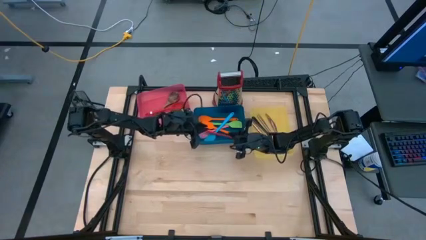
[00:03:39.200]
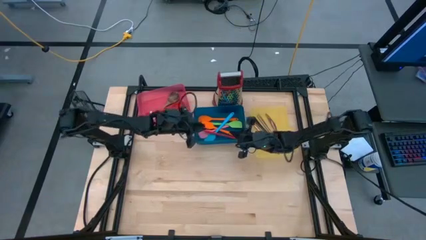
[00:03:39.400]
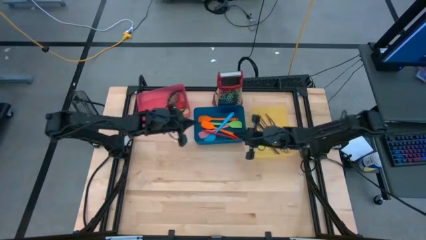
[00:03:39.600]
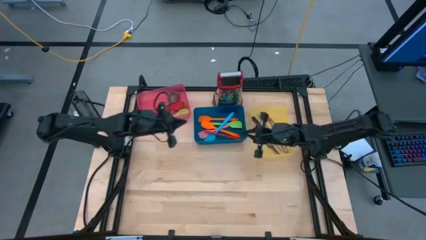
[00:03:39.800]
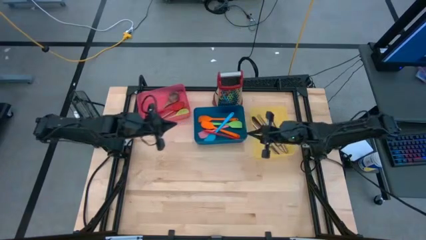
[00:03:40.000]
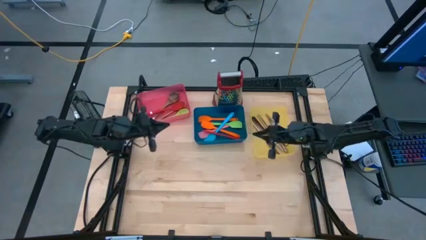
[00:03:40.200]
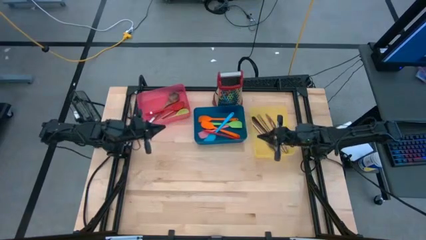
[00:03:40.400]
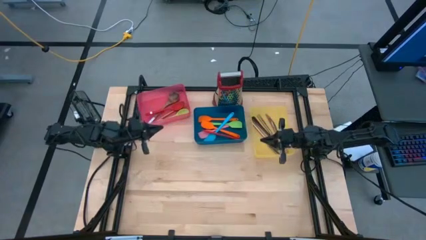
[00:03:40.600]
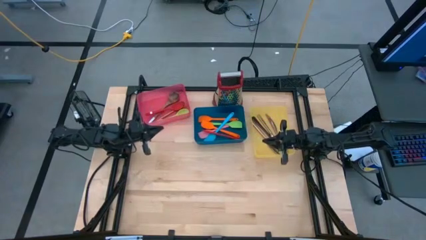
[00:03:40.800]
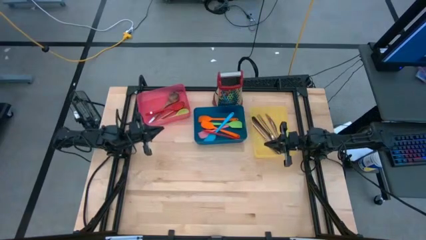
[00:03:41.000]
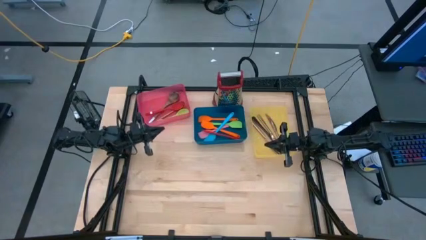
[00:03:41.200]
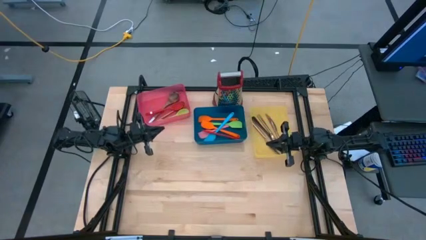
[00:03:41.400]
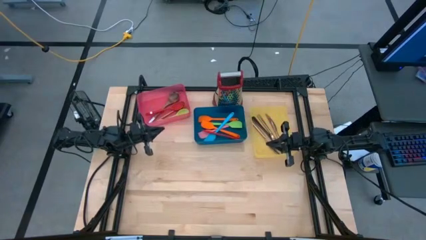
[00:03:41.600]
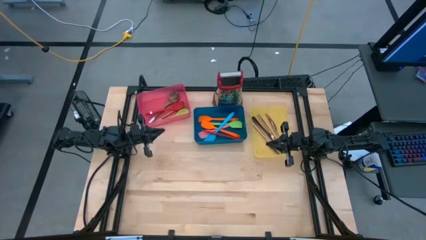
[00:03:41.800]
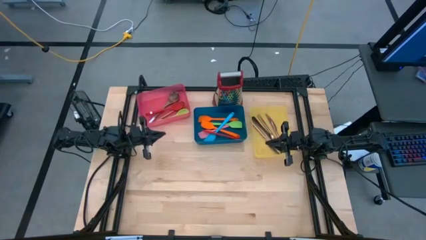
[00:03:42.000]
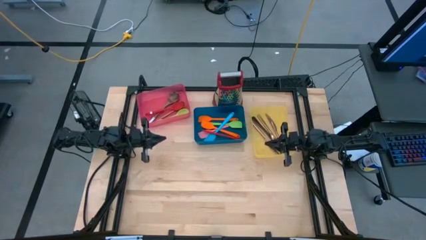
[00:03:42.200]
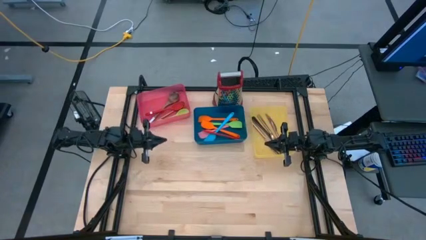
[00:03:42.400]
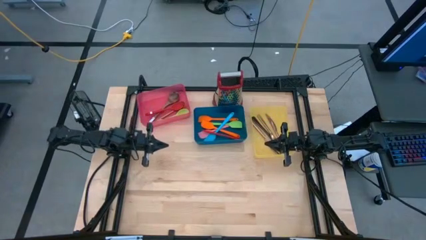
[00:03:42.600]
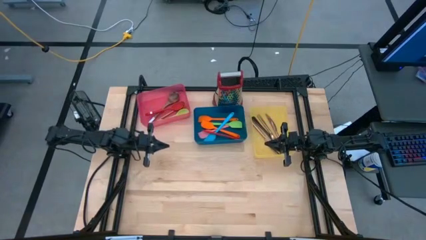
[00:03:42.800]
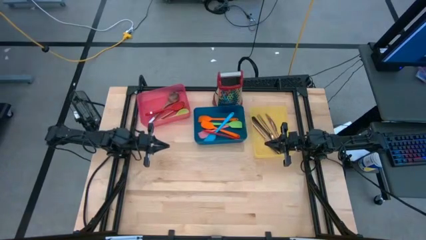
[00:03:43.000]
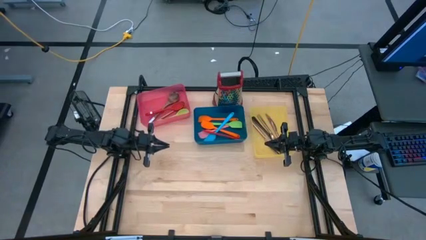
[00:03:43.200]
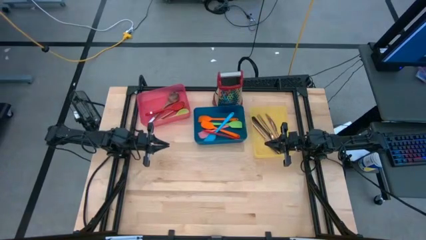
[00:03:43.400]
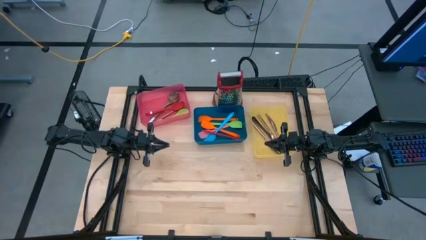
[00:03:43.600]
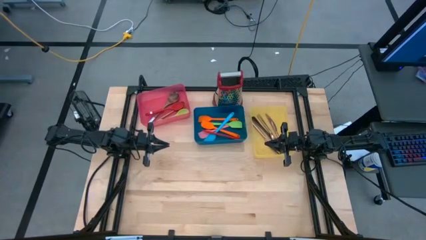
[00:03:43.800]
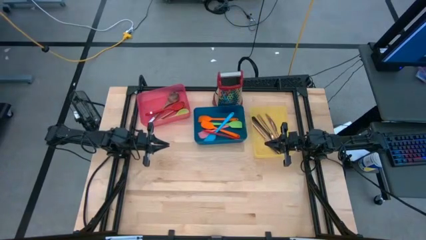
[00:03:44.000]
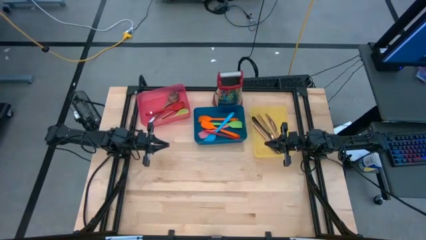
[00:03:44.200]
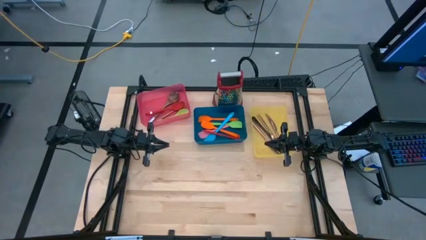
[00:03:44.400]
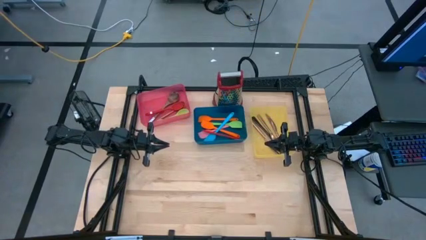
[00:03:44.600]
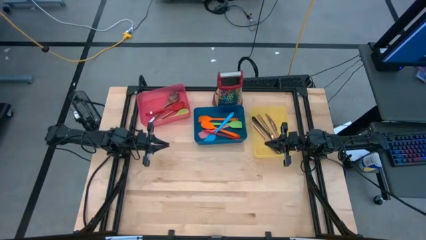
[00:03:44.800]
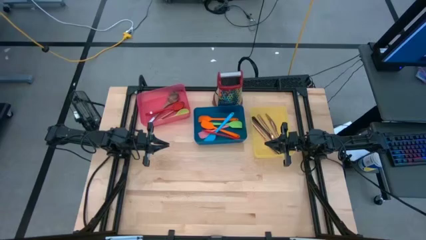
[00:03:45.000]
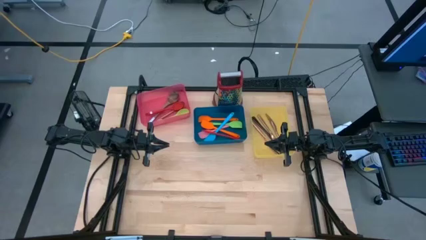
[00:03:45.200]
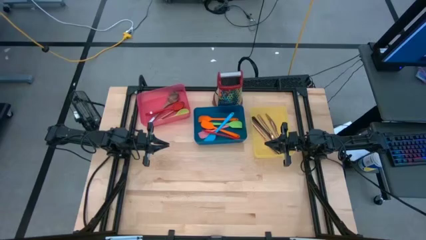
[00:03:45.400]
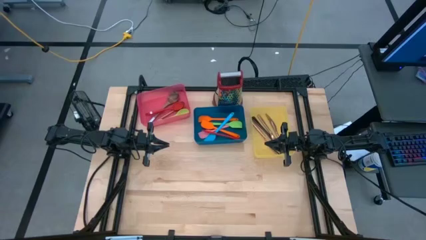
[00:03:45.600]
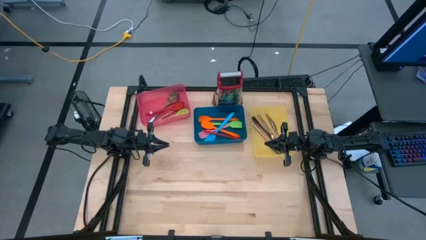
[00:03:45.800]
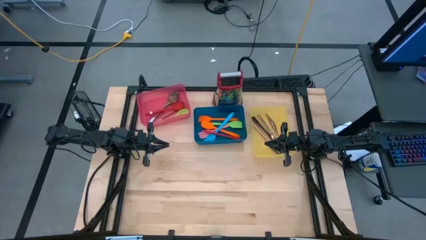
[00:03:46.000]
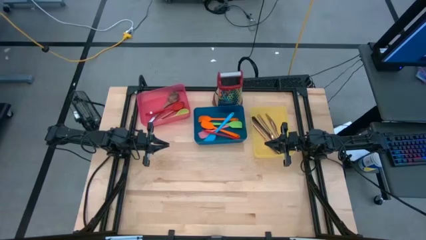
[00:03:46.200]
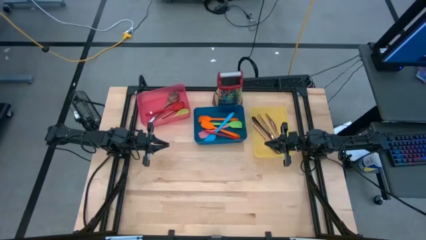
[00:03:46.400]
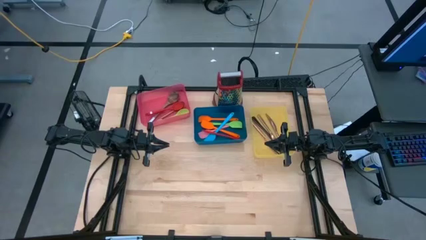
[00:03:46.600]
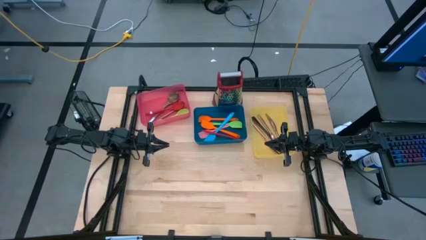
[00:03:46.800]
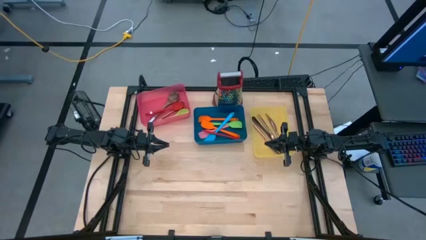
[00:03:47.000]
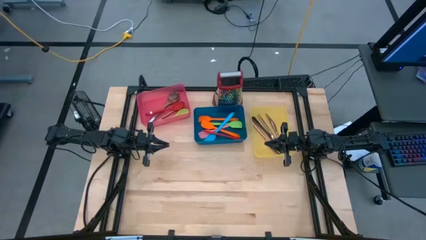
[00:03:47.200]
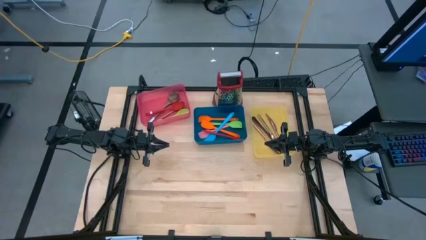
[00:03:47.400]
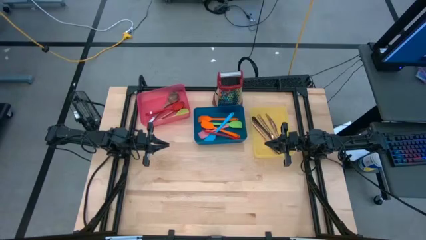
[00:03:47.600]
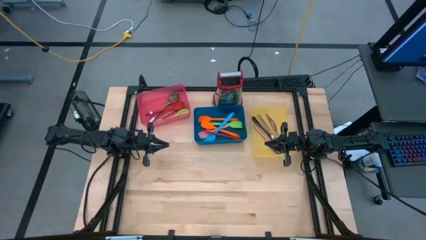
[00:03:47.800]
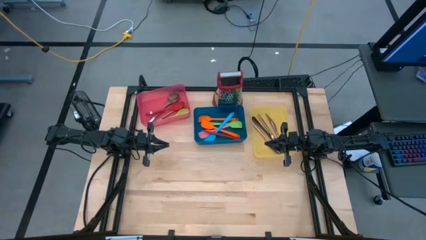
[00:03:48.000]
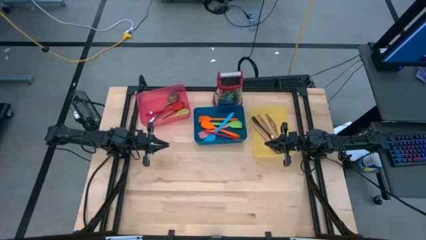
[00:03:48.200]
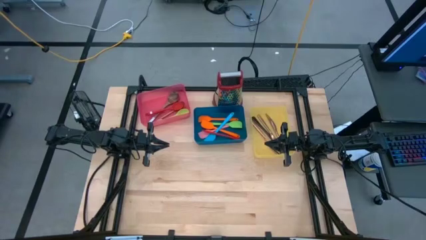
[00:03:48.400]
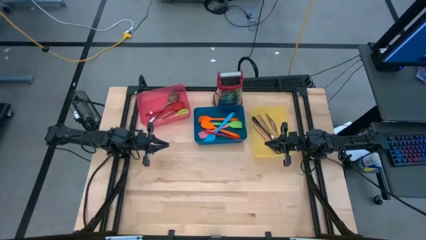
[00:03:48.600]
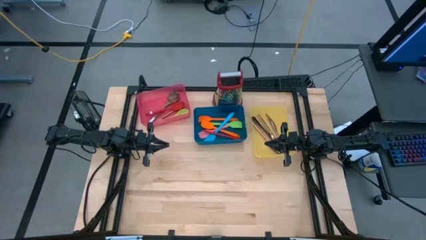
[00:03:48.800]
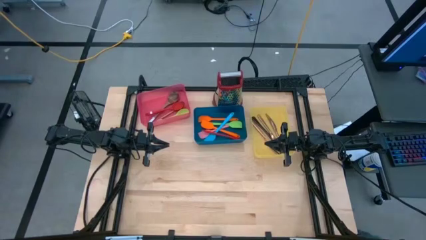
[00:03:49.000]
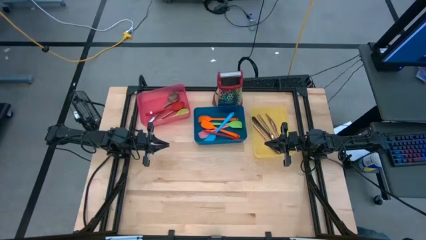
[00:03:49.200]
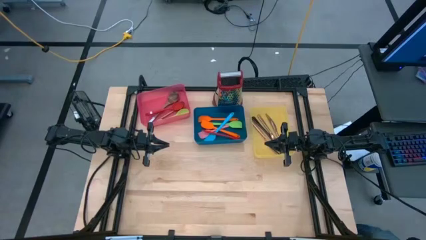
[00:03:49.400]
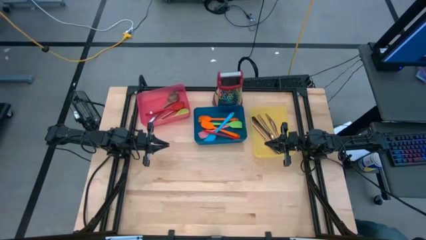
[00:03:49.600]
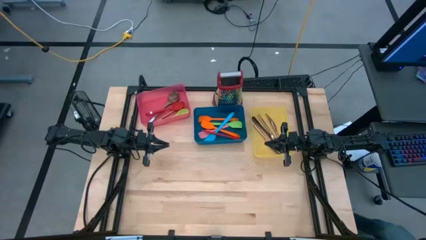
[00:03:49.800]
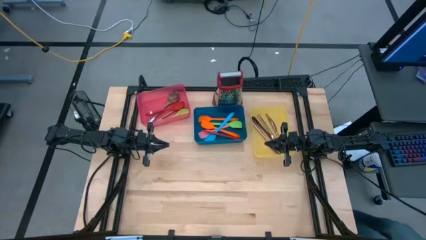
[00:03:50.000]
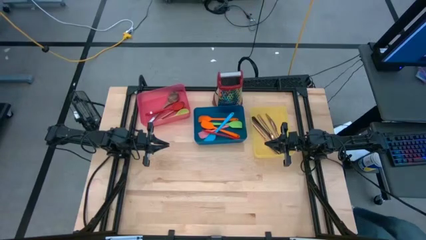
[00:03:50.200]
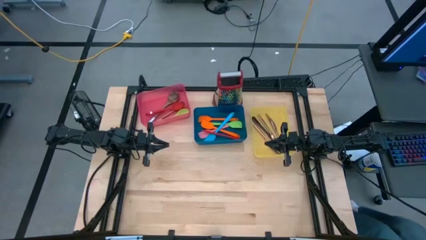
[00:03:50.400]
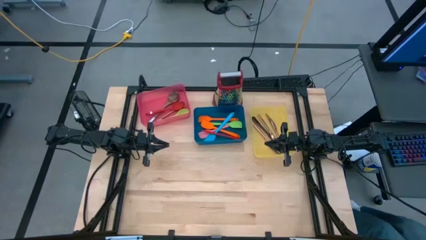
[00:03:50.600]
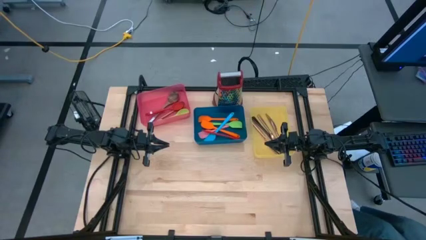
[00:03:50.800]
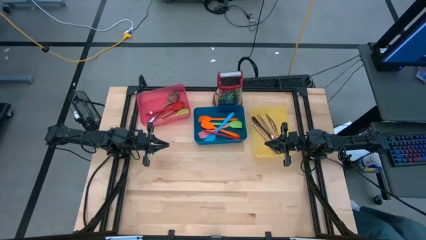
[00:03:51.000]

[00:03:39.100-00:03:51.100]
Task: Pick & Place Kitchen Items
Return to Home Position

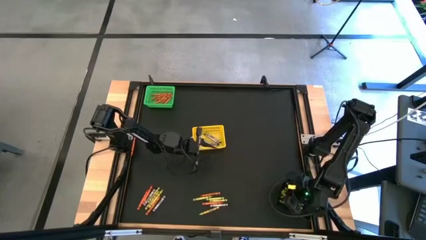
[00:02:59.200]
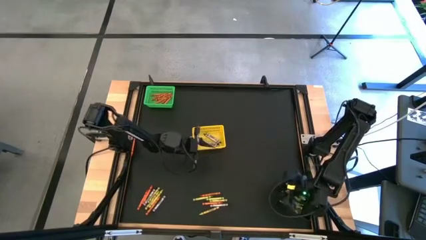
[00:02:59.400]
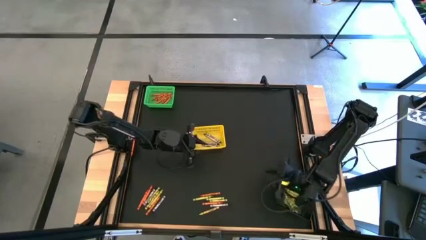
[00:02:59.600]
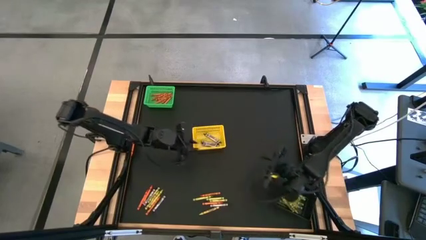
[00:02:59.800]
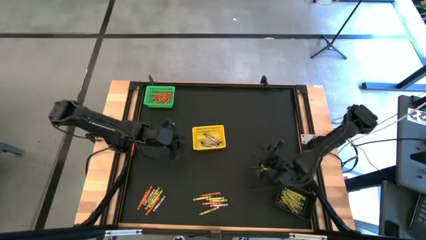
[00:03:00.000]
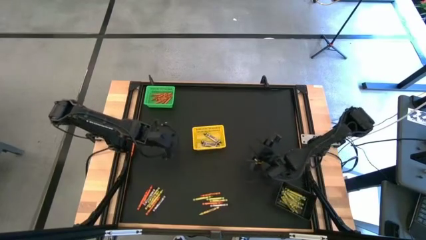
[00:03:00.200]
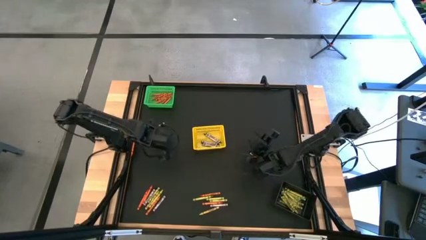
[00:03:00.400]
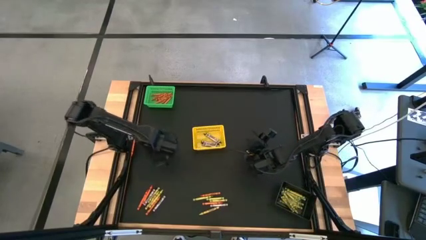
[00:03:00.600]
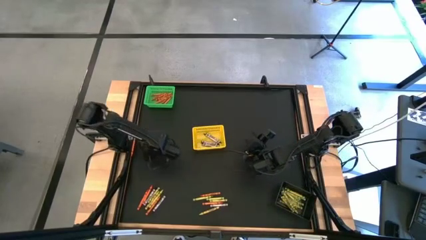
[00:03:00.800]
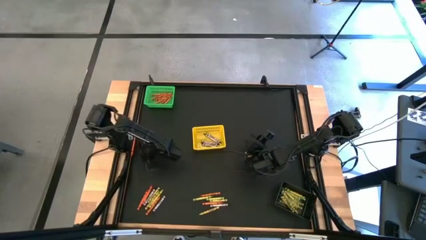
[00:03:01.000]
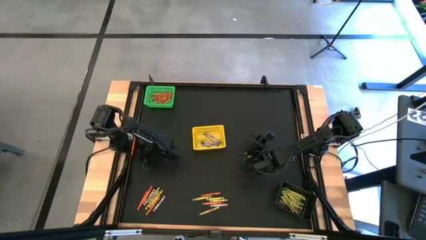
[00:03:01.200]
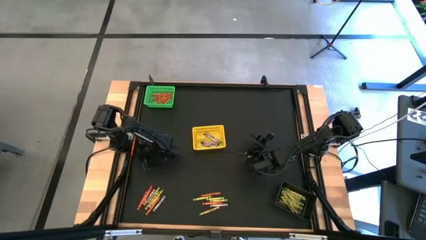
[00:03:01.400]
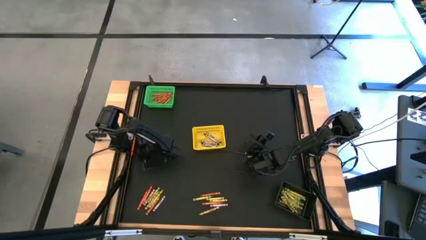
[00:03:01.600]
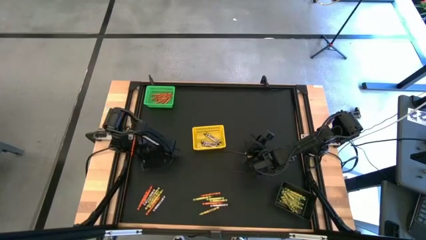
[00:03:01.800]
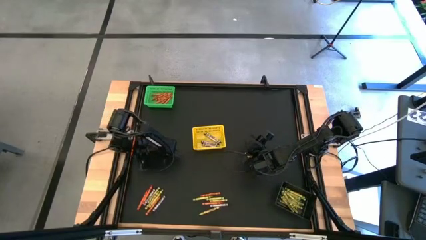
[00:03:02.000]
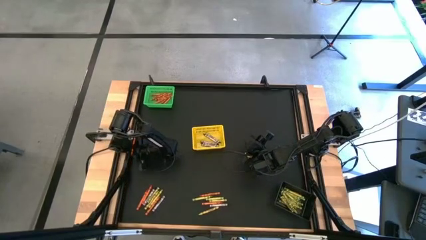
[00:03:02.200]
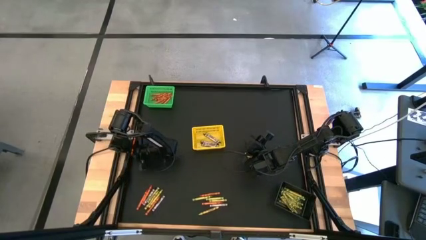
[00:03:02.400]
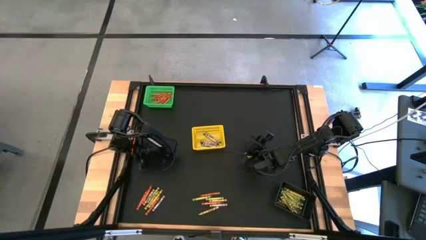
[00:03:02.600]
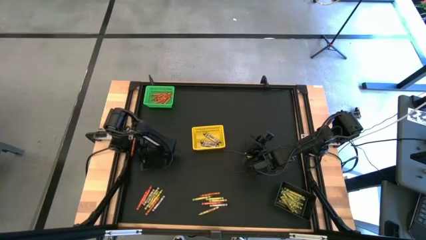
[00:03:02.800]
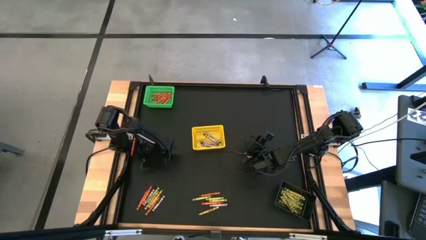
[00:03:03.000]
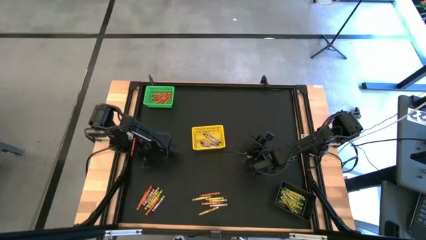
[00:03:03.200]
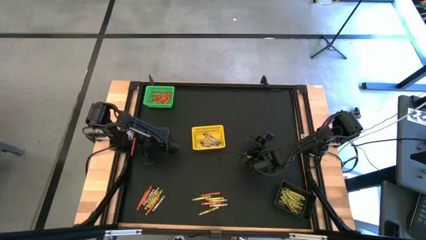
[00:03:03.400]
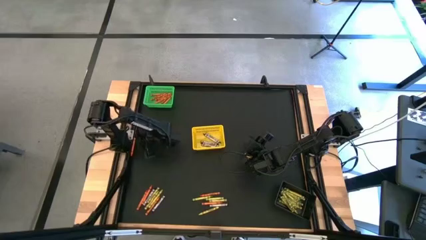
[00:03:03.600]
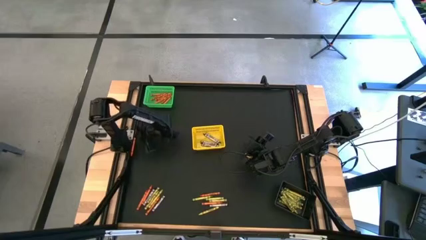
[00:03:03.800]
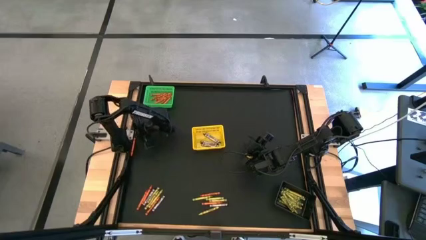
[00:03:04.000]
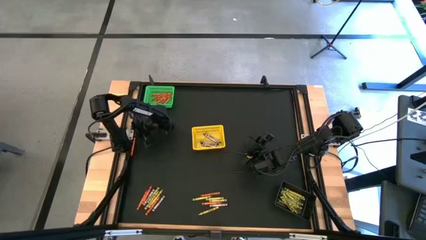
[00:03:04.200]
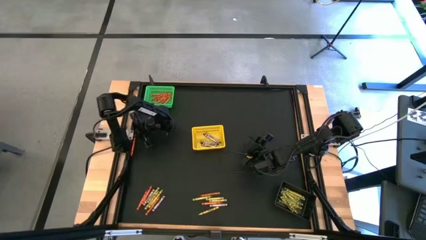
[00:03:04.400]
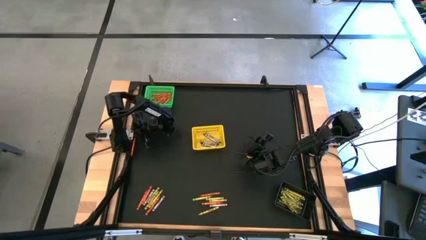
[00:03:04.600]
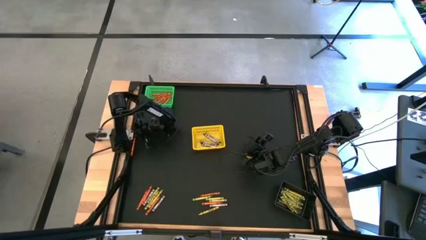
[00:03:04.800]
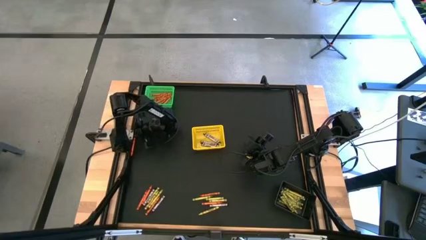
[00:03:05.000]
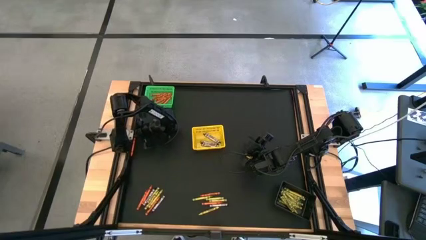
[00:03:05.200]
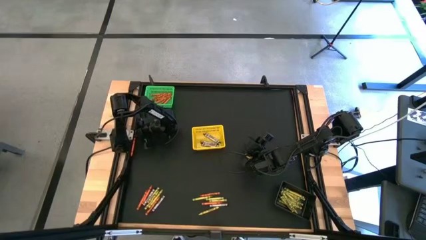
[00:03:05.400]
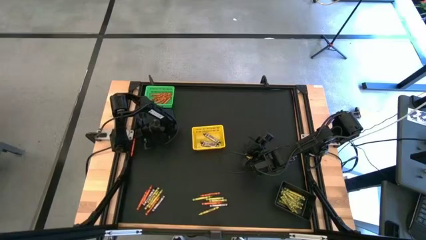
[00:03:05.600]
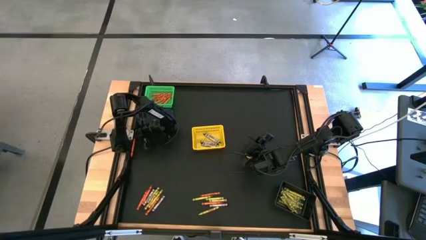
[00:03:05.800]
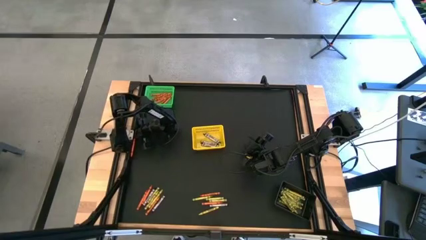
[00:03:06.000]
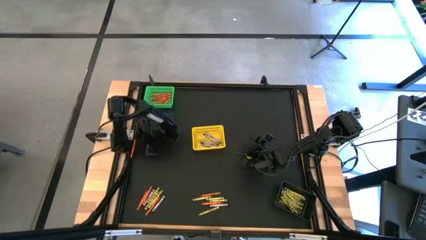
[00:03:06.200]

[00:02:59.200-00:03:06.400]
Task: Sort crayons
Put the orange crayon into the green bin
